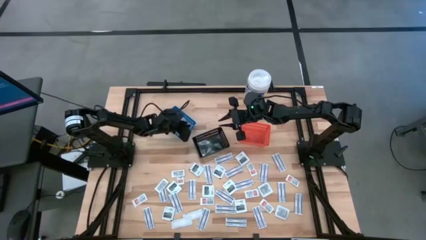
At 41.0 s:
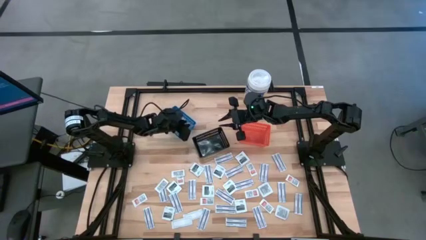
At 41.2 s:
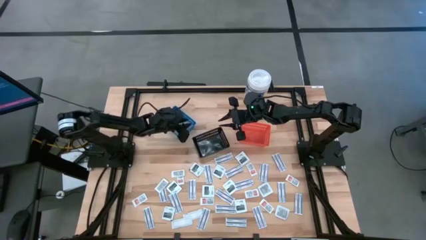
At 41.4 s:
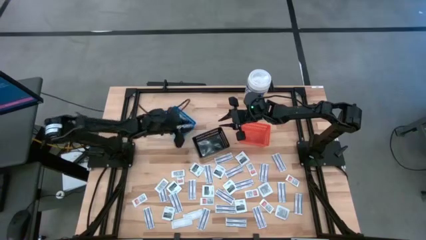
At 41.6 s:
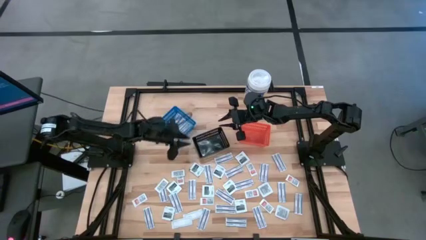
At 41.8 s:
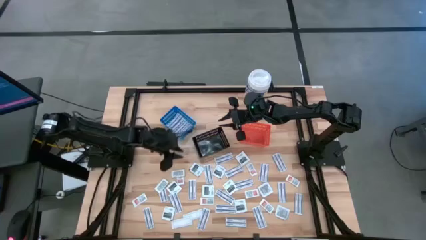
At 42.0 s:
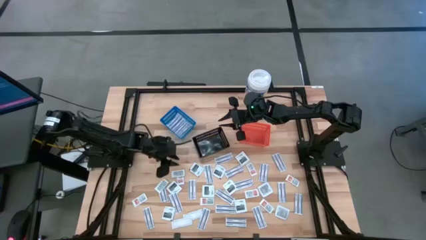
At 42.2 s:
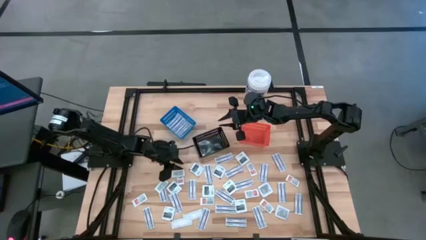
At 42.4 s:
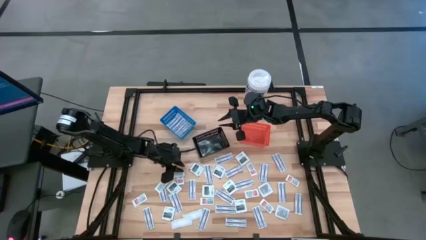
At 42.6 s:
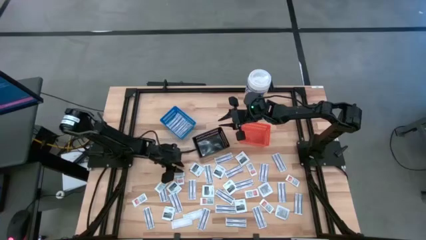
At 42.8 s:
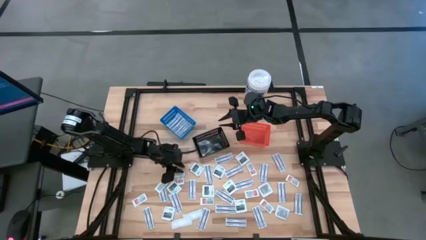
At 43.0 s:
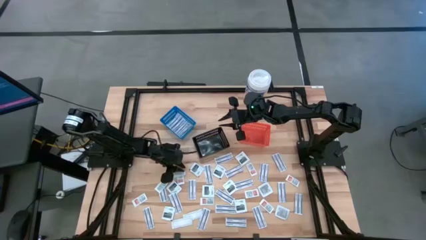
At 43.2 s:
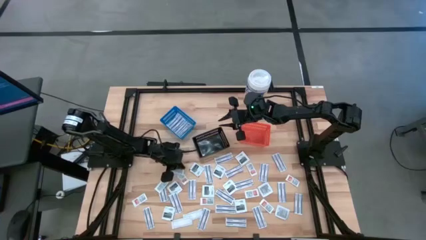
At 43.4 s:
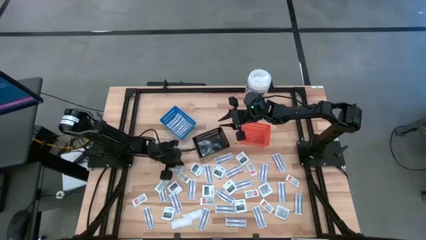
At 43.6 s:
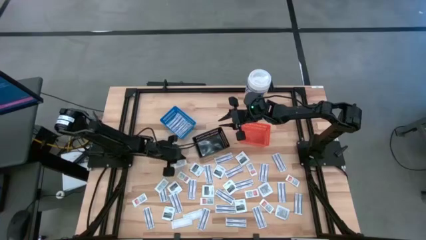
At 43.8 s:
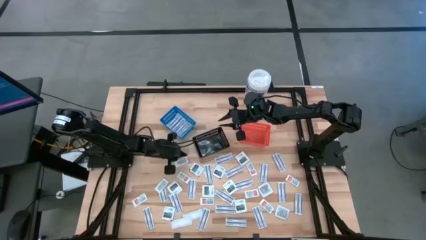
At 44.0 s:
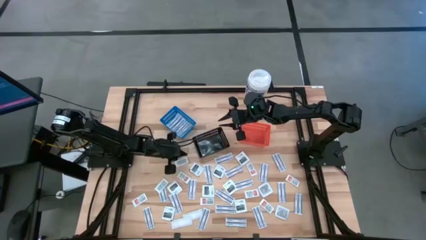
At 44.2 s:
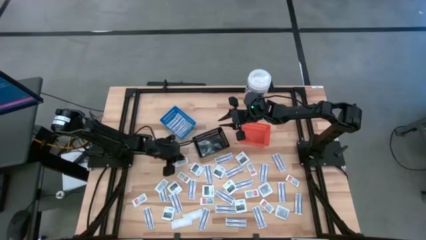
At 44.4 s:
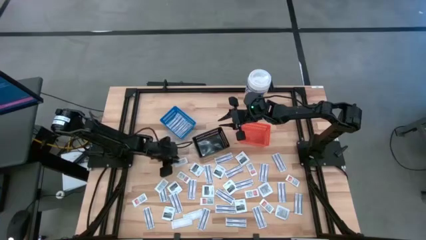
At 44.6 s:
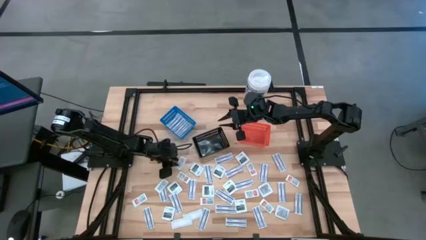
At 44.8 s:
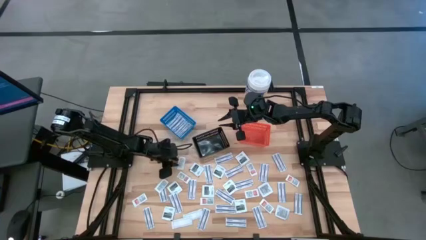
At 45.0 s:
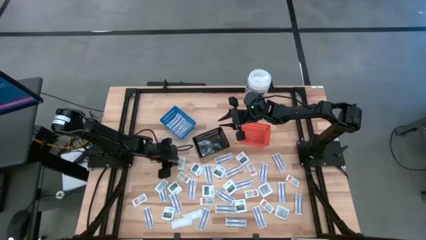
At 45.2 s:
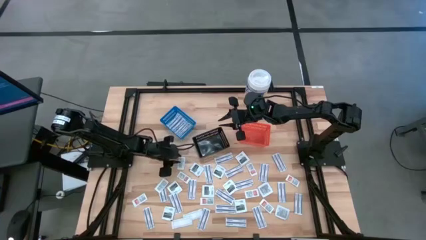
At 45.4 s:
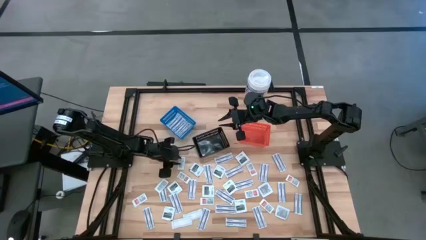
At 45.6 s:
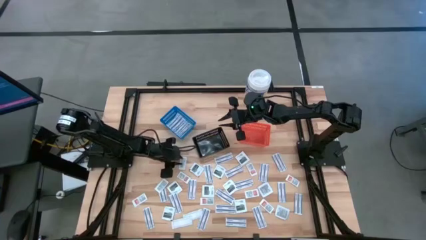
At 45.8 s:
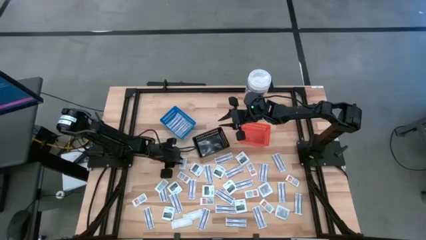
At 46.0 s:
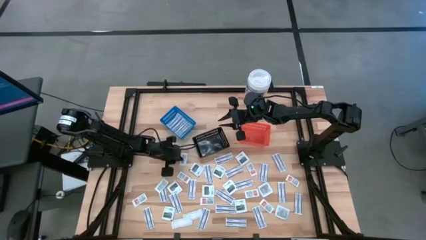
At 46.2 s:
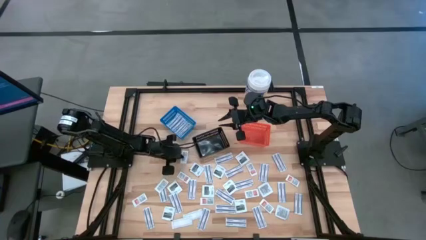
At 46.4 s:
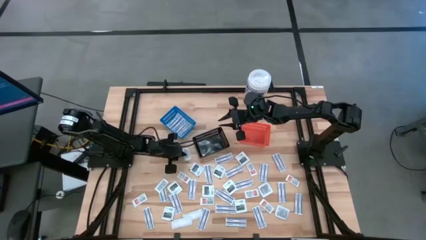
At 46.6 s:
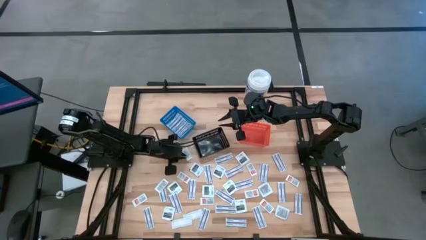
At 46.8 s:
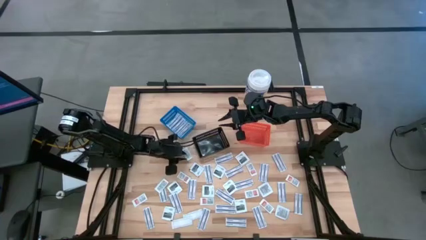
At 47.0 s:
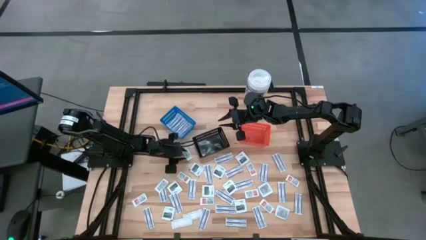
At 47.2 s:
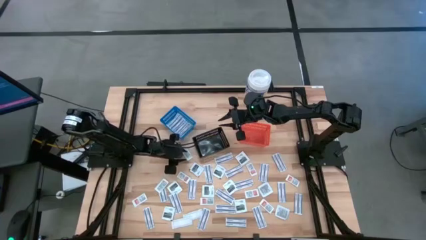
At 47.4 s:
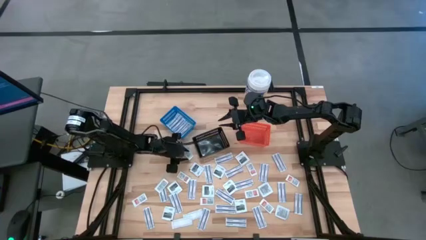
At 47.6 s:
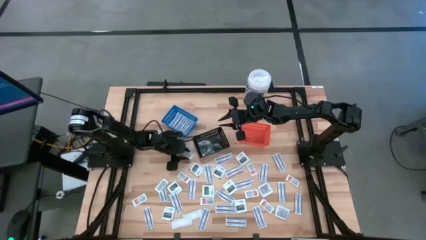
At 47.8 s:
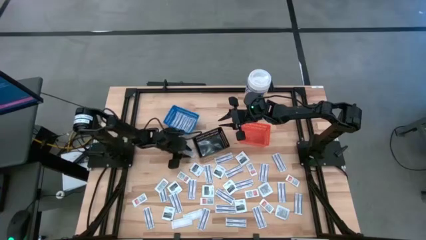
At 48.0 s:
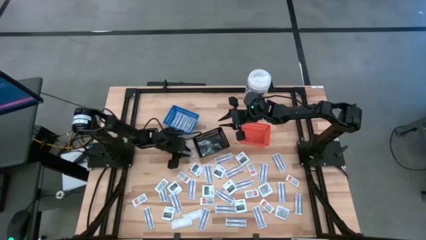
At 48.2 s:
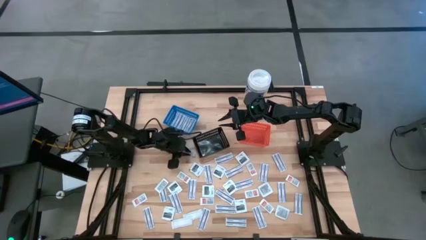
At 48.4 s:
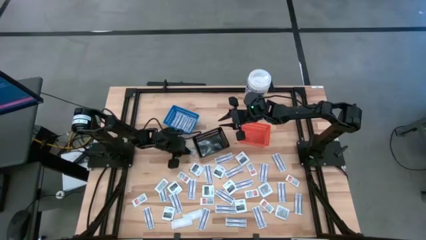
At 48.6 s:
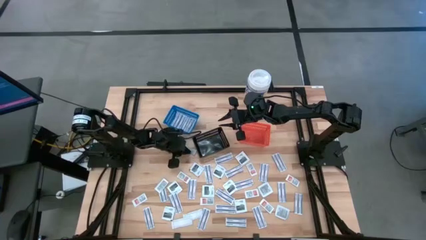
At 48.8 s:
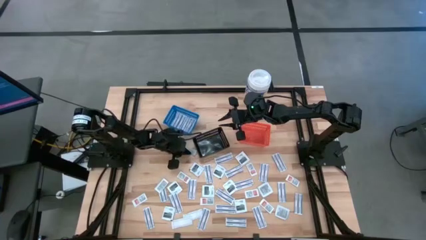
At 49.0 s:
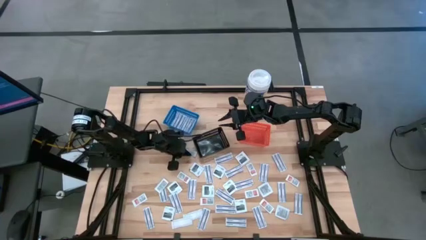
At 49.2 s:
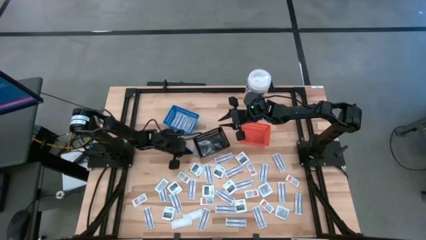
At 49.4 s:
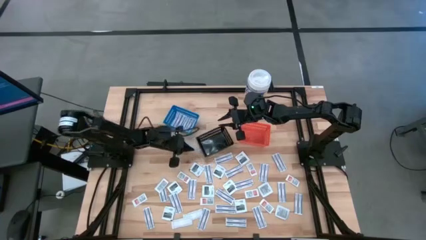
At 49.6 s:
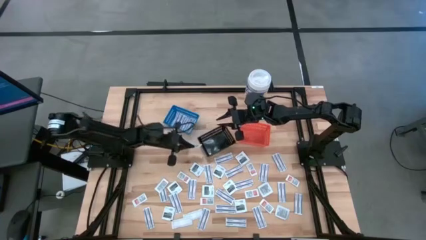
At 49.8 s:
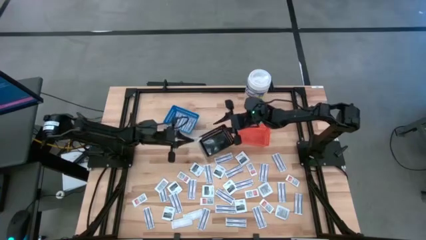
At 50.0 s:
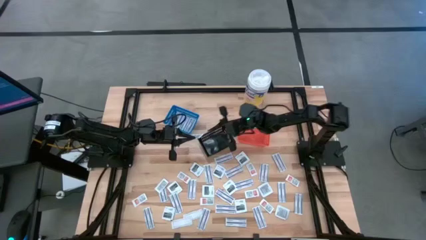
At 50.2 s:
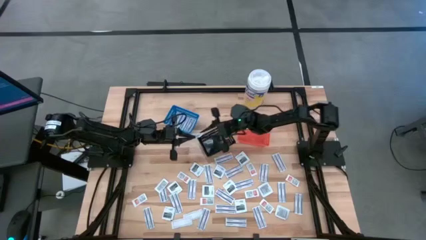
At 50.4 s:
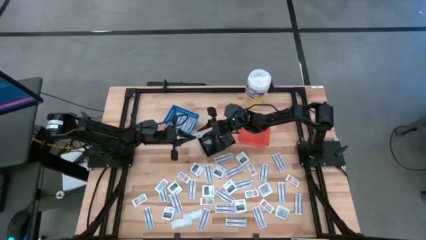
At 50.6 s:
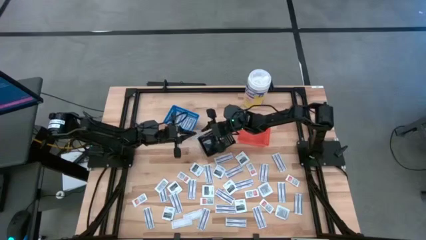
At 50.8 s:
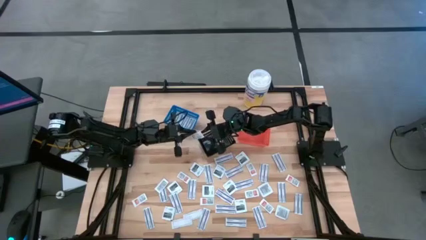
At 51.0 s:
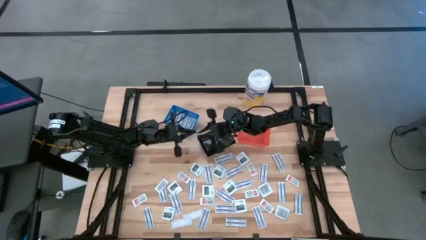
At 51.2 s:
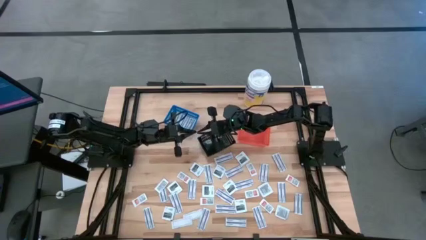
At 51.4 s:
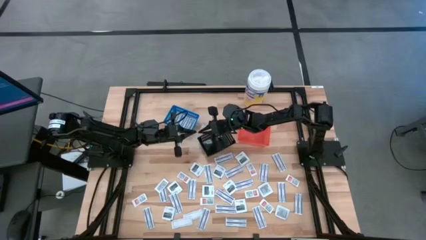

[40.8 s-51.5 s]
Task: Pick & Place First Aid Supplies
Put the ointment pack into the orange bin
